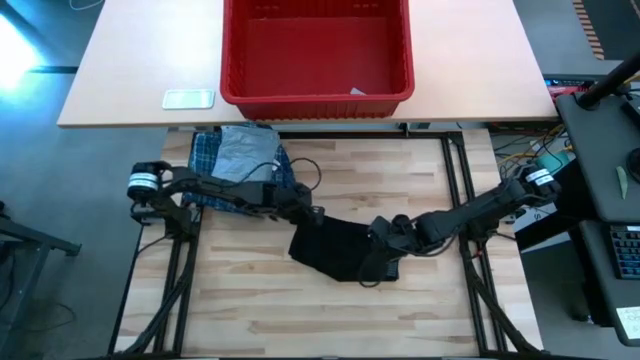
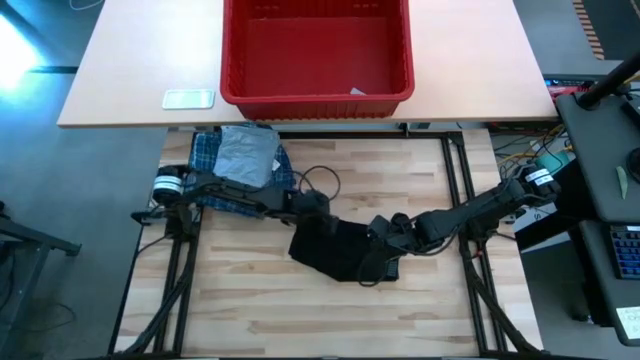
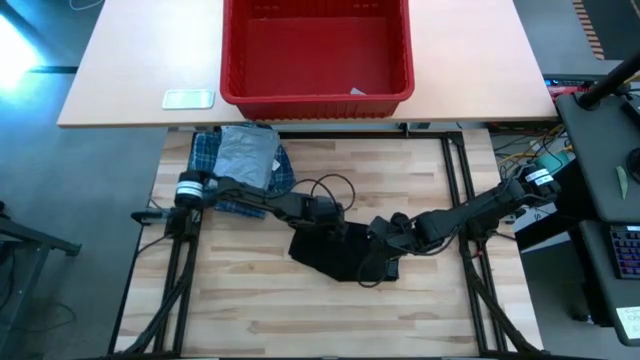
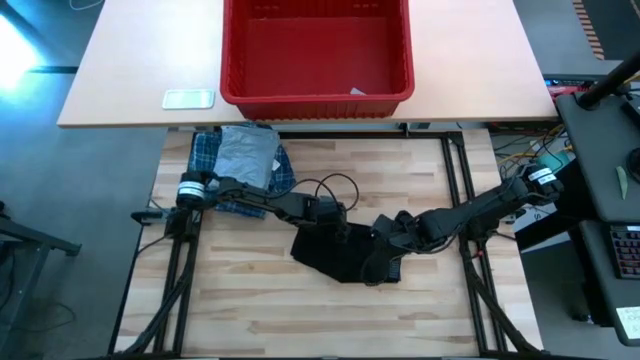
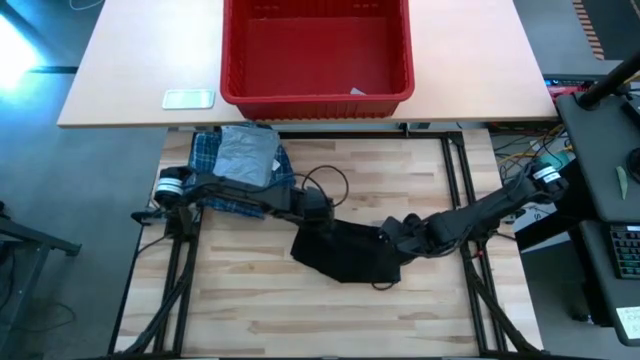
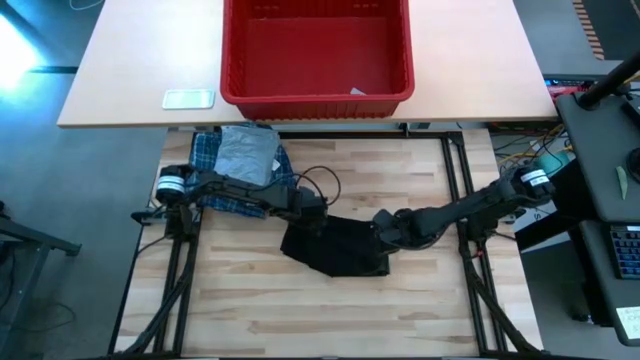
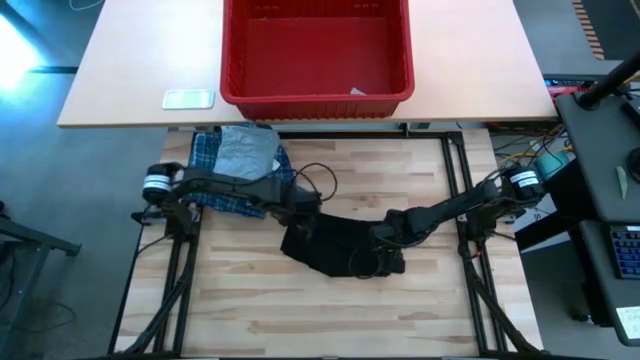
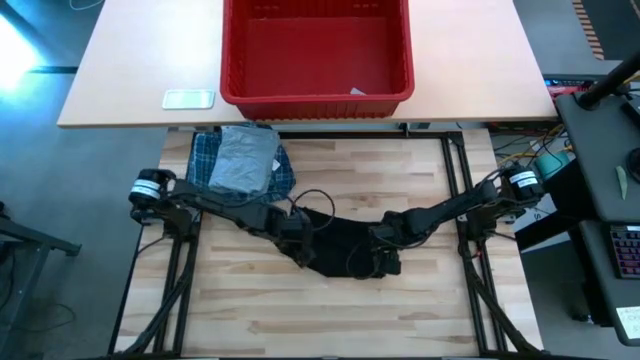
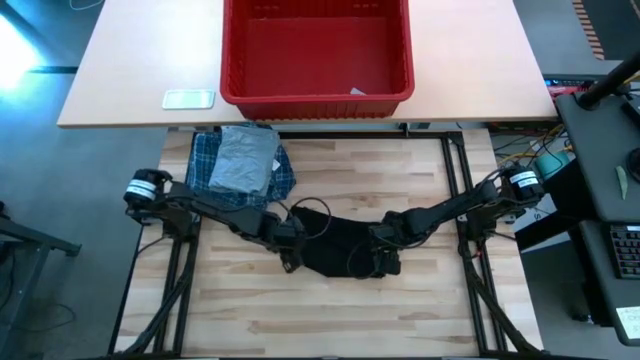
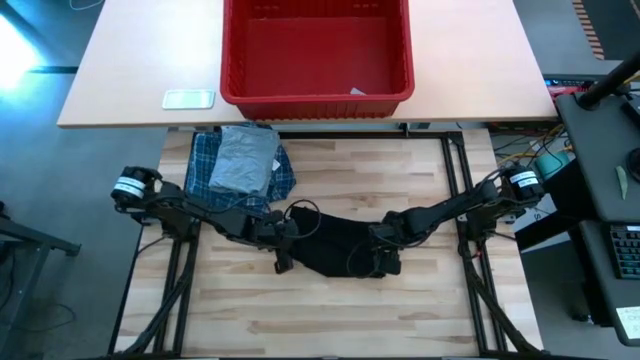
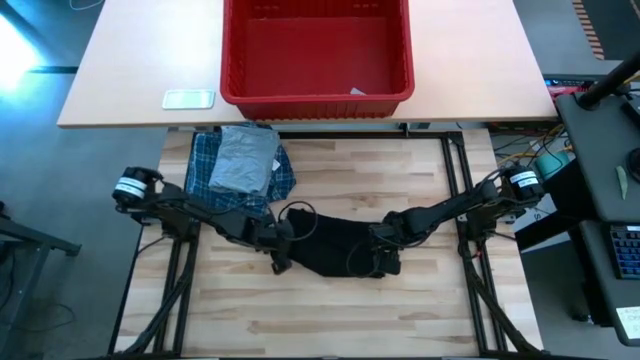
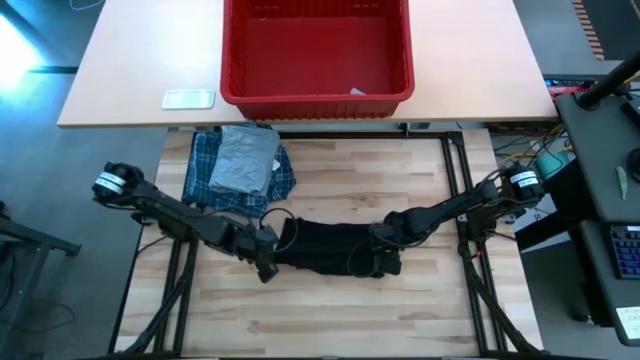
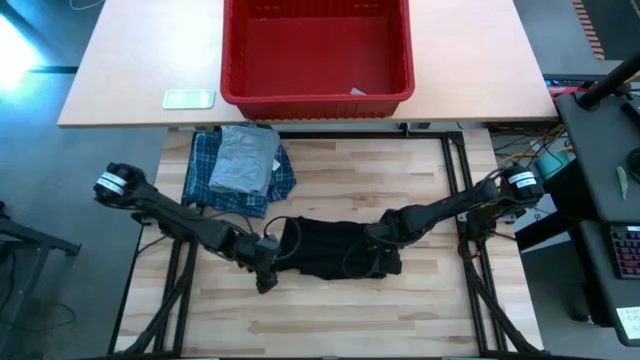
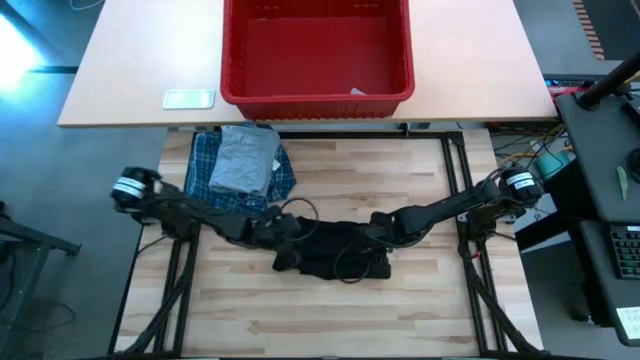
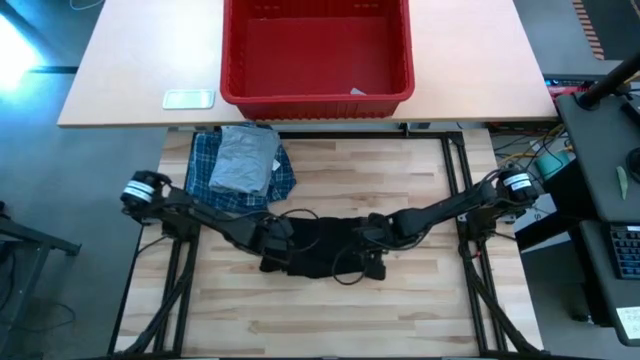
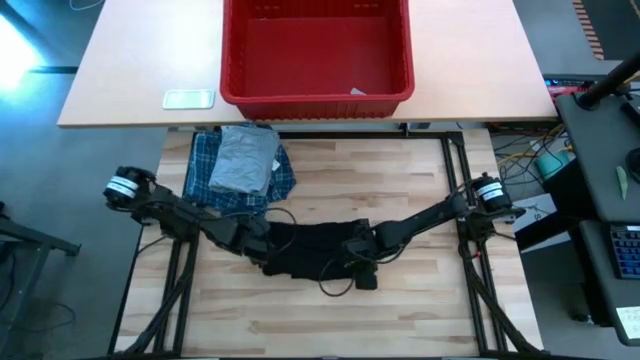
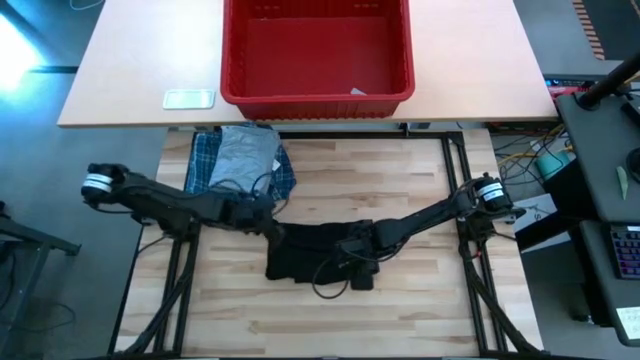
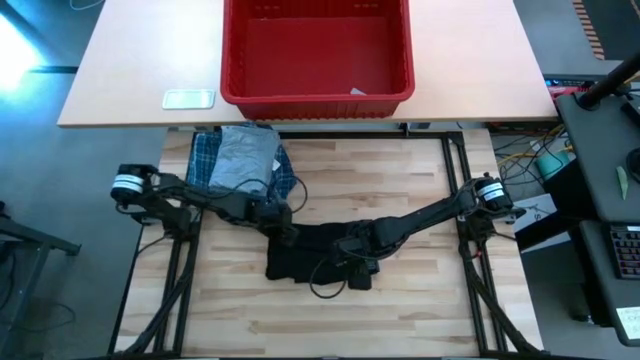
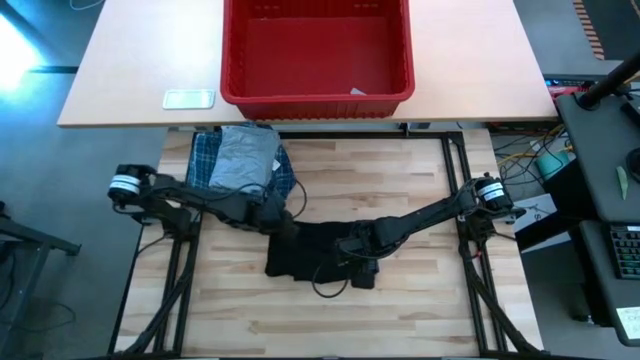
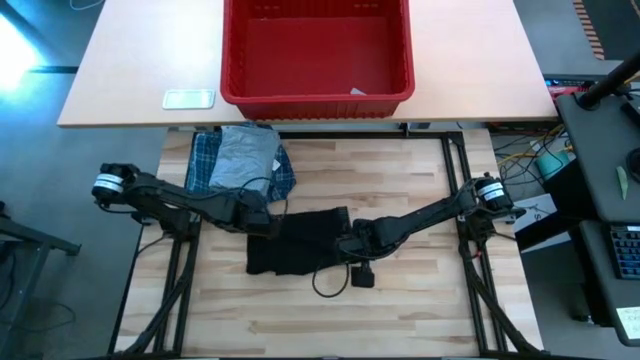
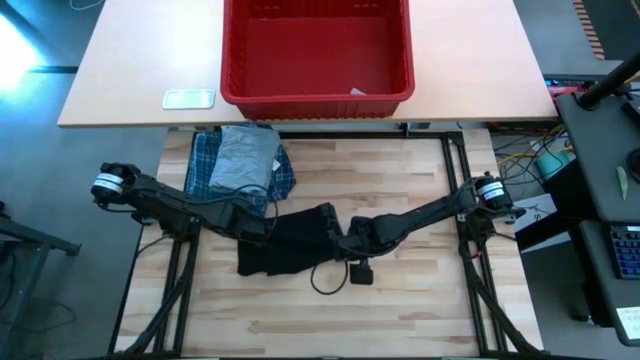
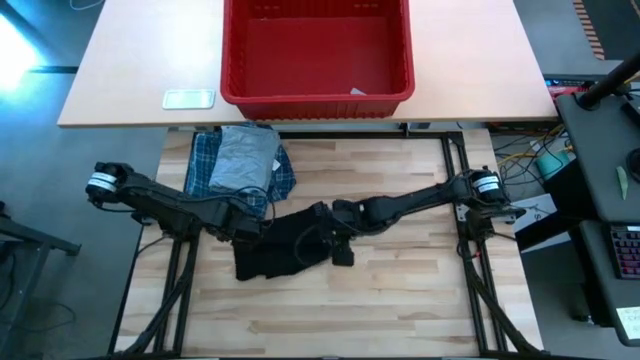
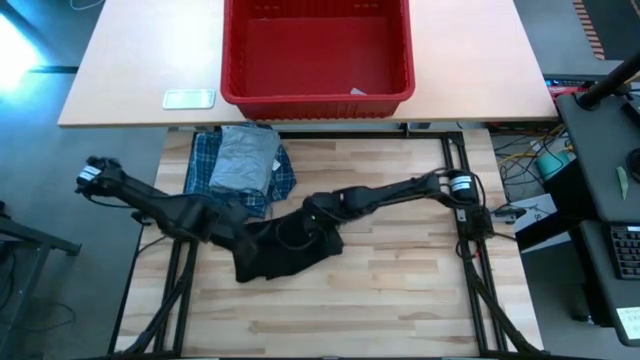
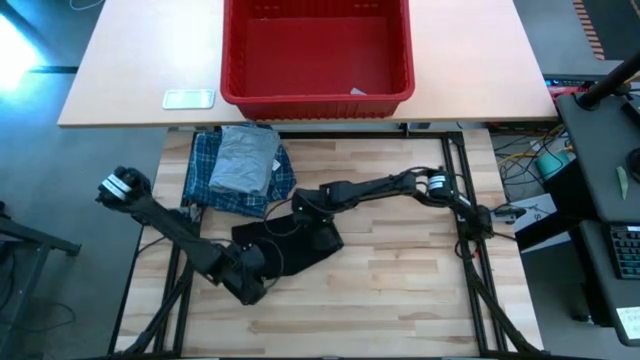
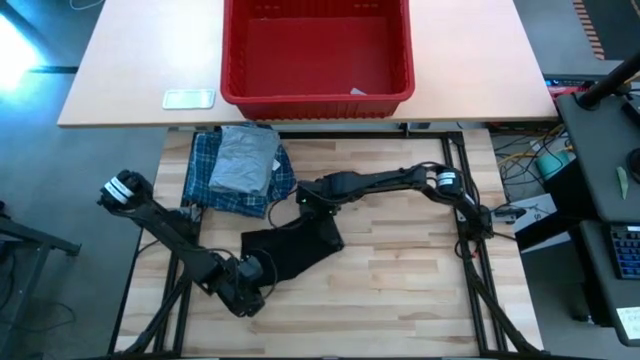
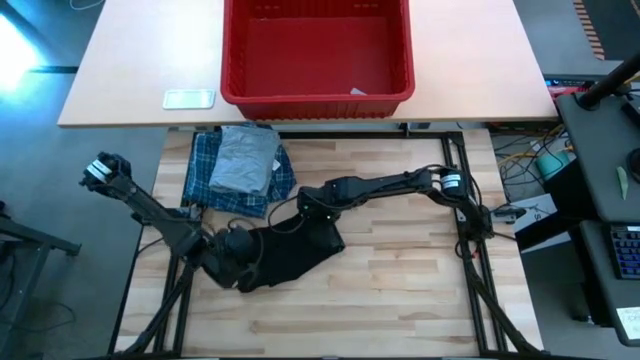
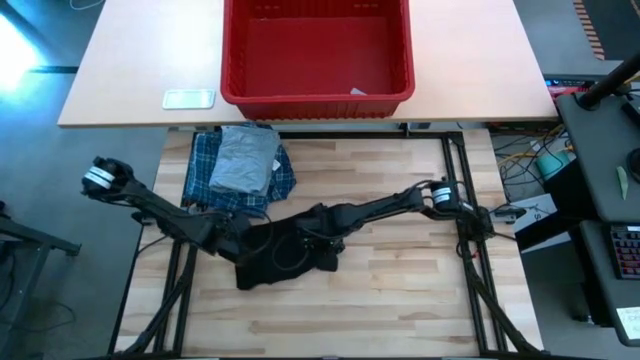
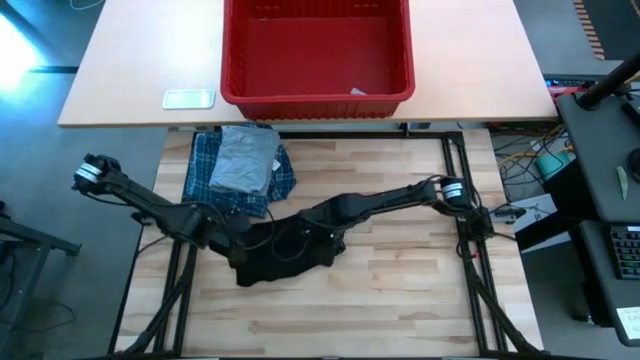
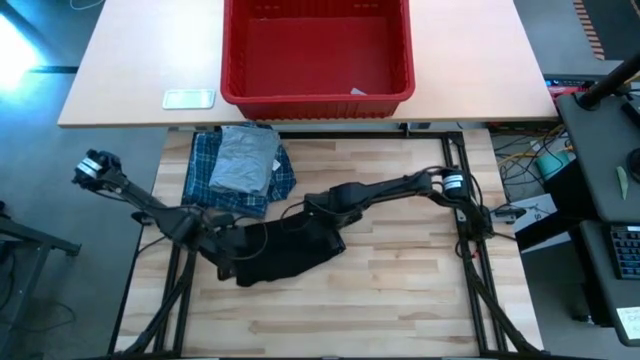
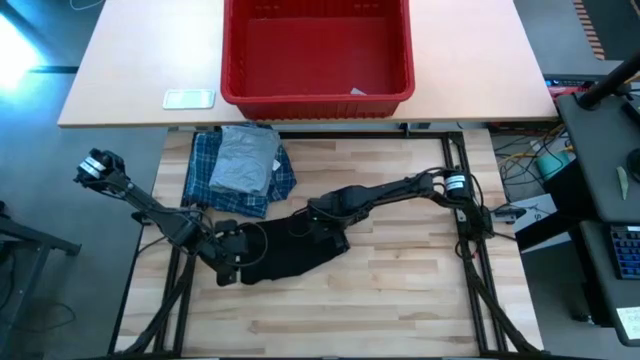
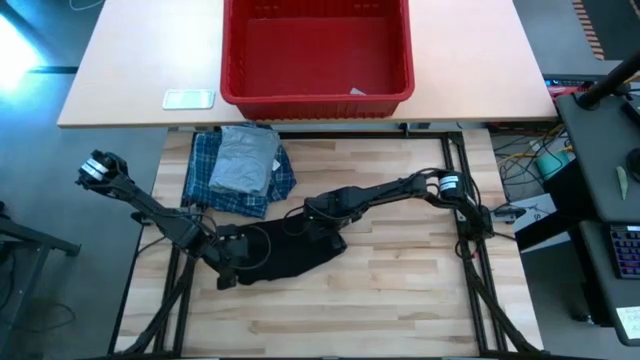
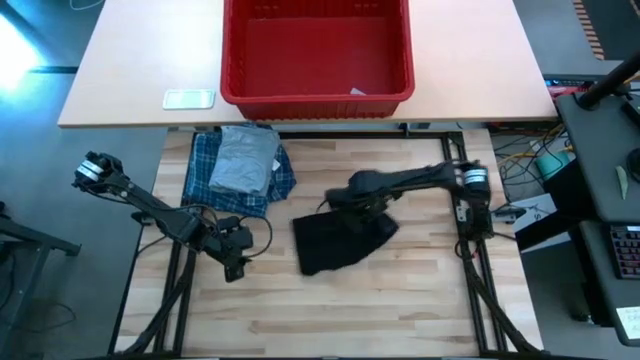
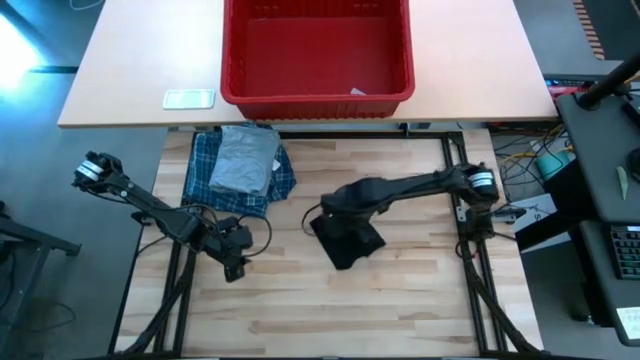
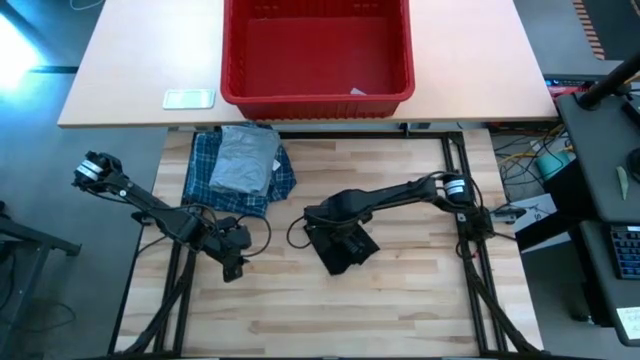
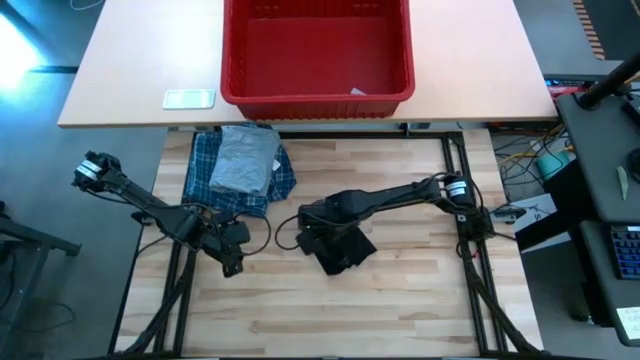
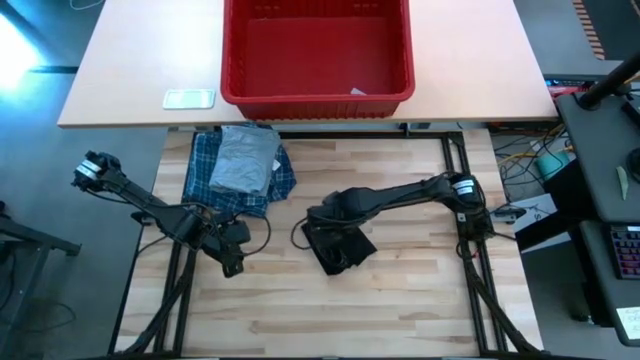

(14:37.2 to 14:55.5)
Task: Fold Laundry from Bin
Fold the black underwear

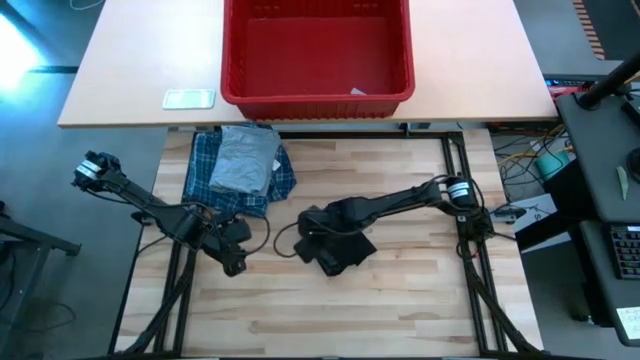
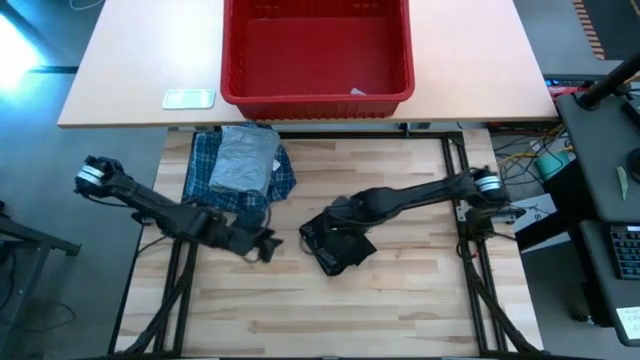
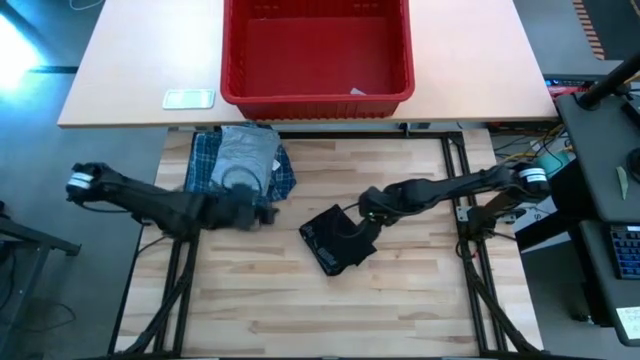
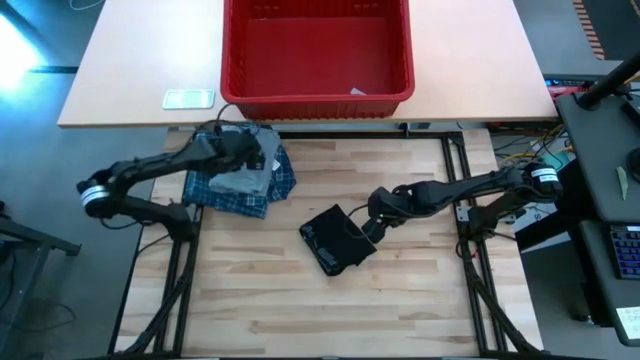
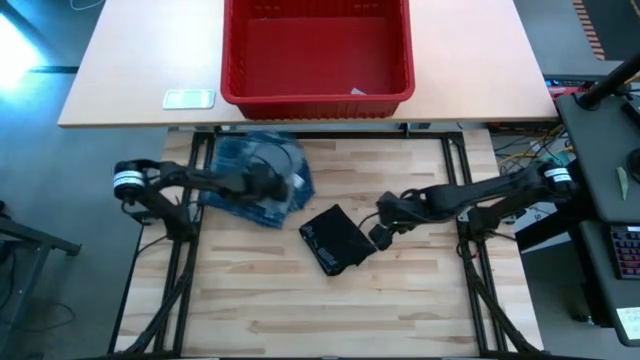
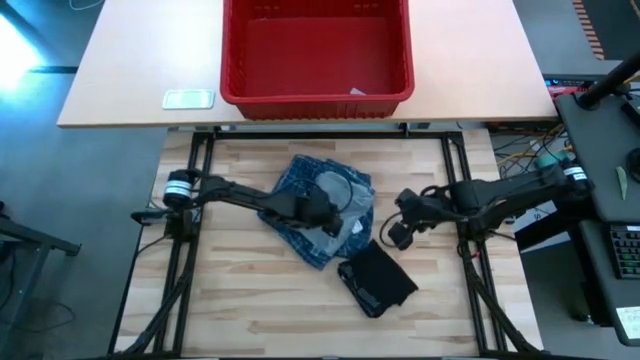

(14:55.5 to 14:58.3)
Adjust the stacked clothes

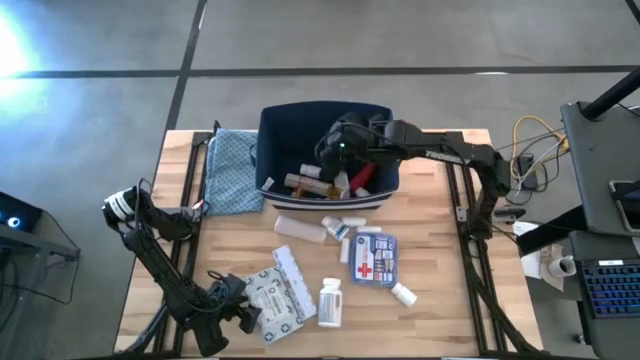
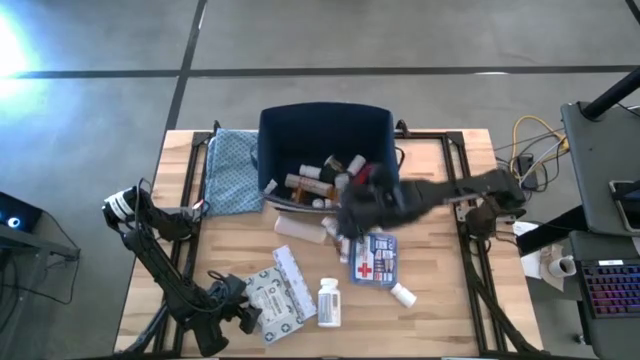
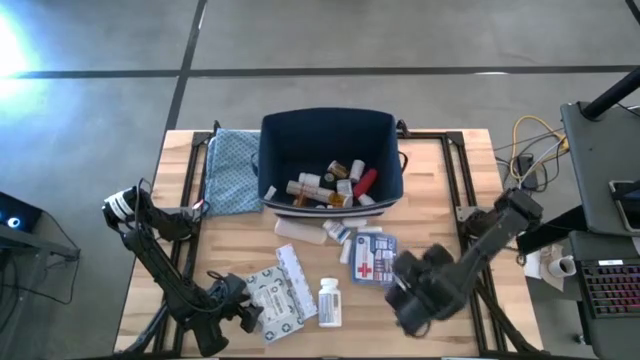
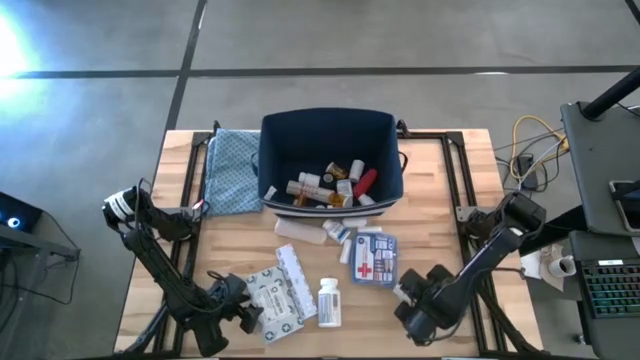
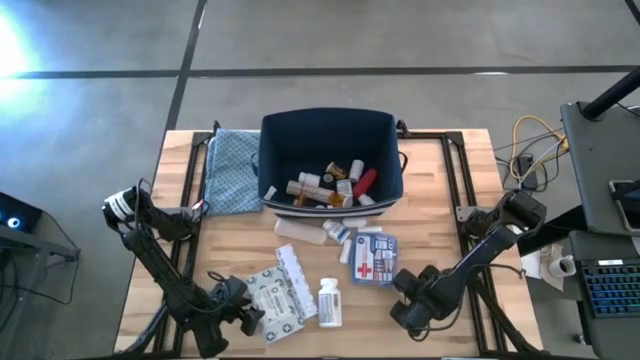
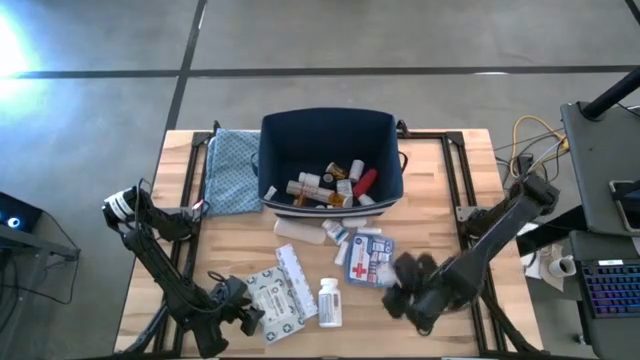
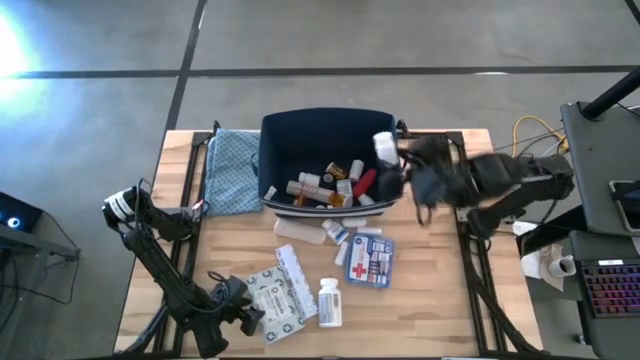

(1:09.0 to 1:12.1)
Task: Pick & place medical supplies in basket/bin
Put the white pill bottle into the blue bin
